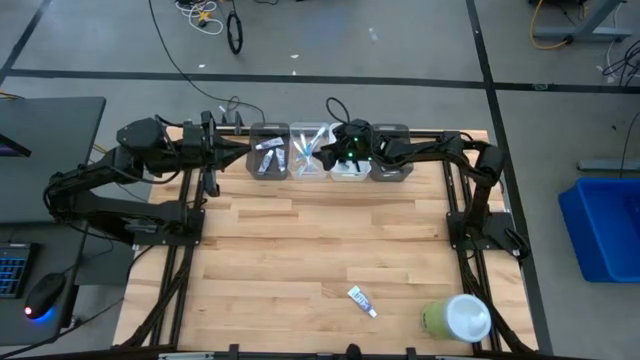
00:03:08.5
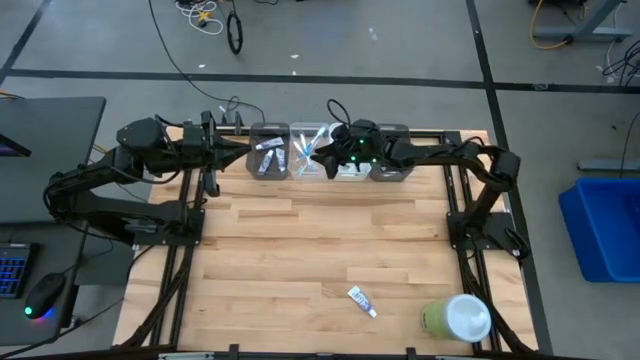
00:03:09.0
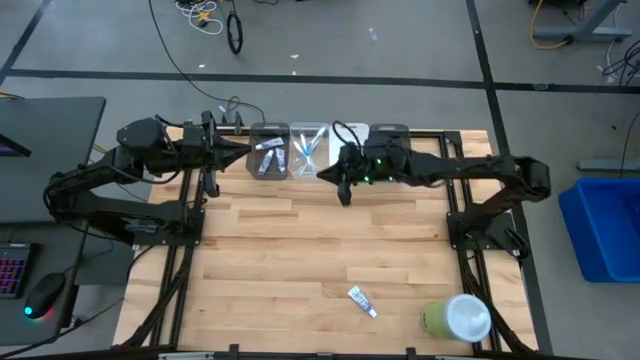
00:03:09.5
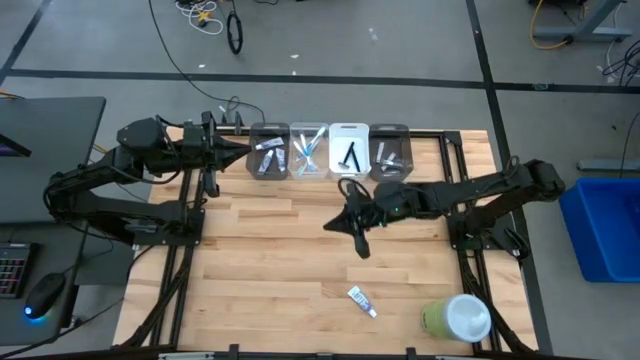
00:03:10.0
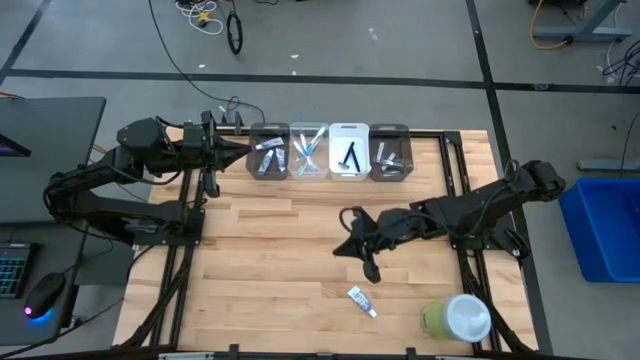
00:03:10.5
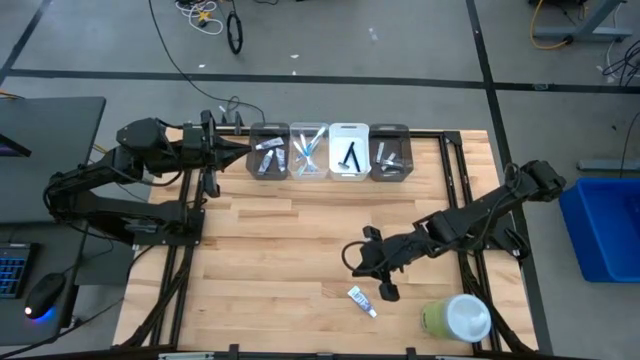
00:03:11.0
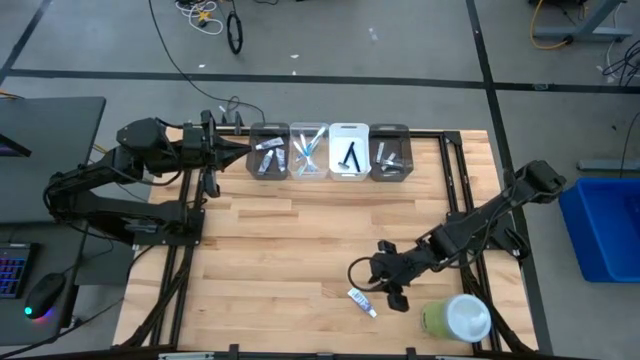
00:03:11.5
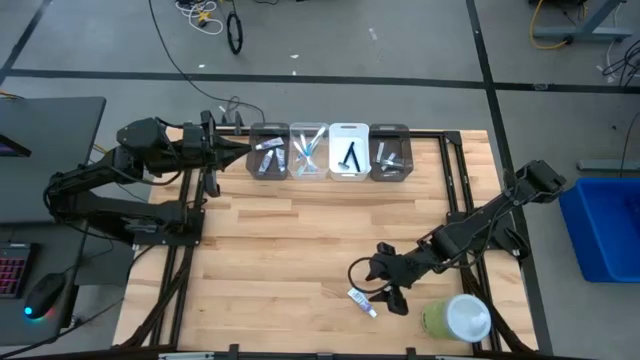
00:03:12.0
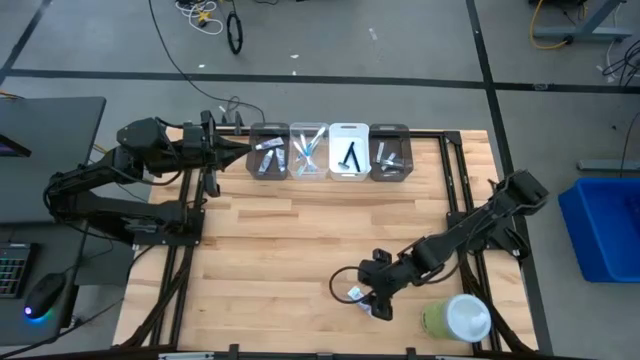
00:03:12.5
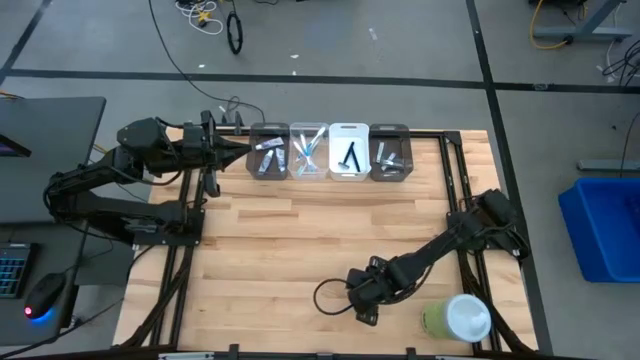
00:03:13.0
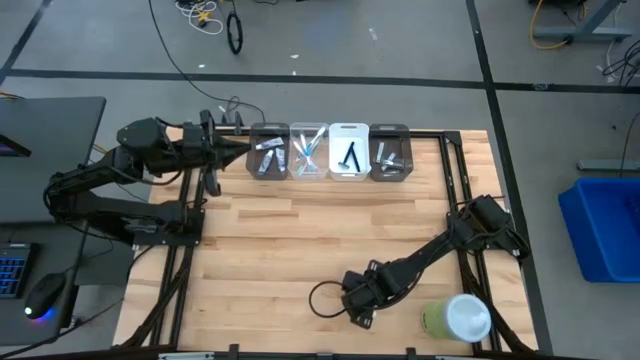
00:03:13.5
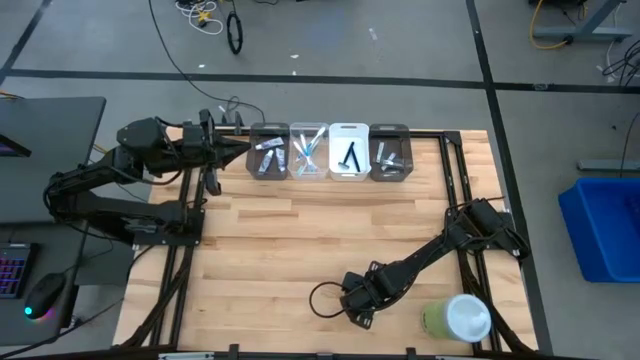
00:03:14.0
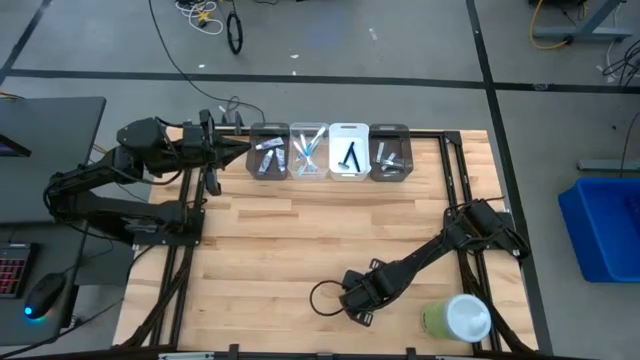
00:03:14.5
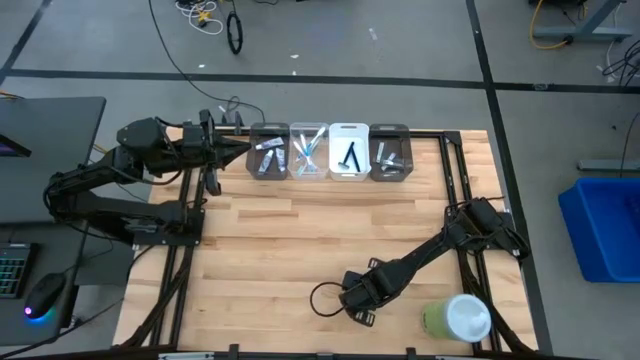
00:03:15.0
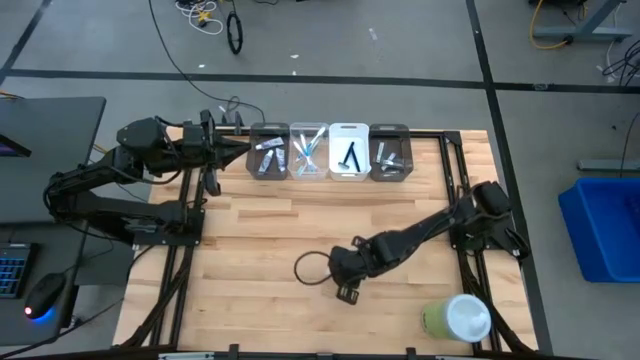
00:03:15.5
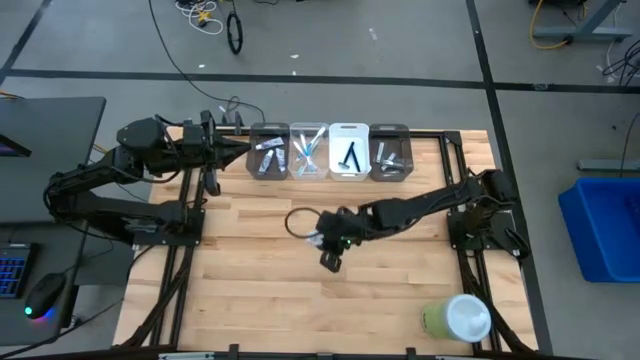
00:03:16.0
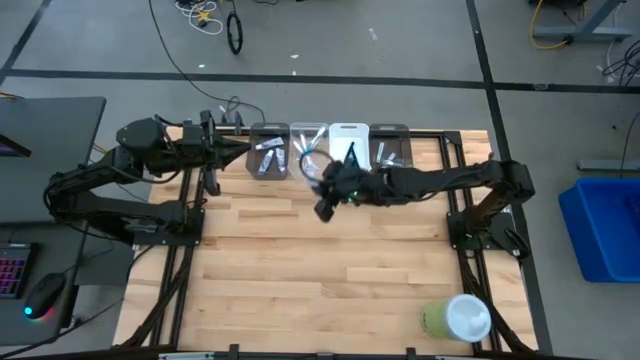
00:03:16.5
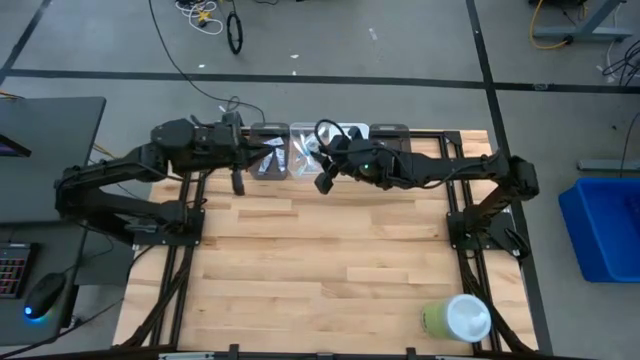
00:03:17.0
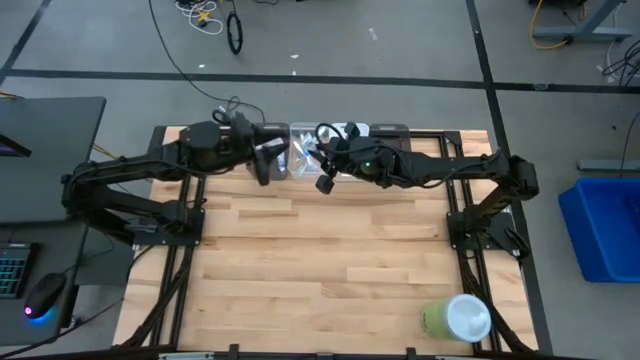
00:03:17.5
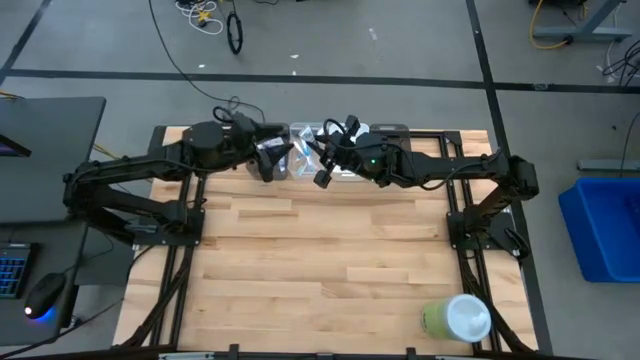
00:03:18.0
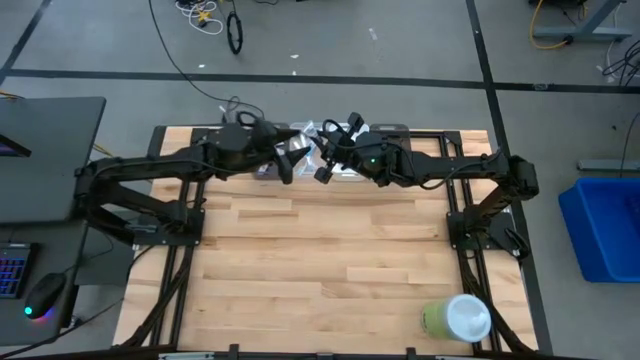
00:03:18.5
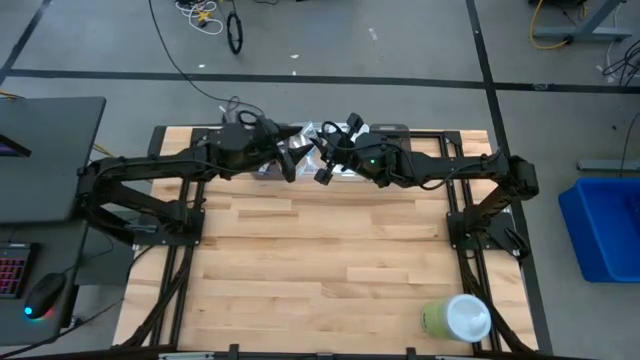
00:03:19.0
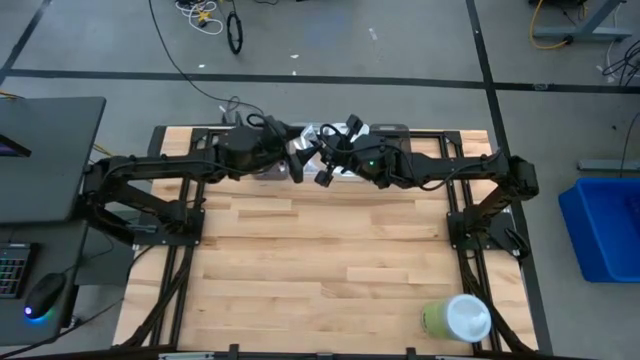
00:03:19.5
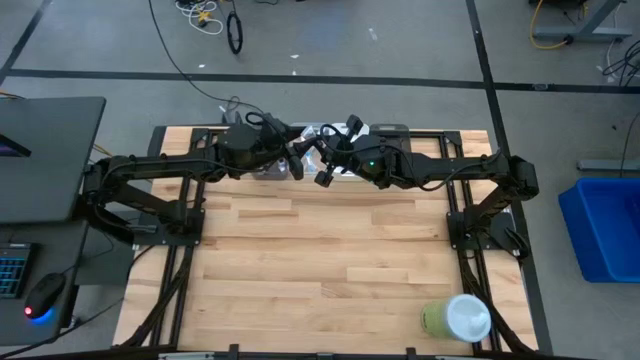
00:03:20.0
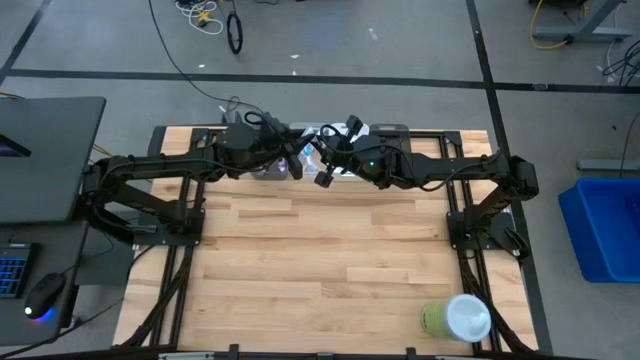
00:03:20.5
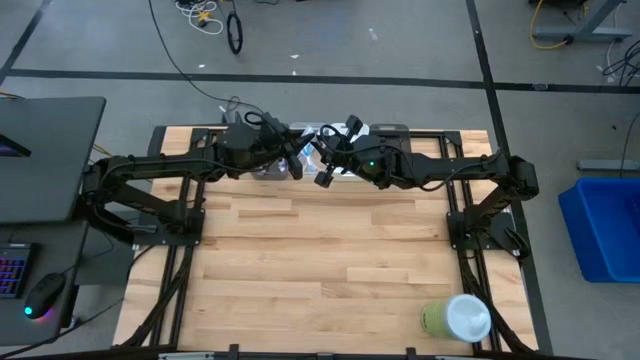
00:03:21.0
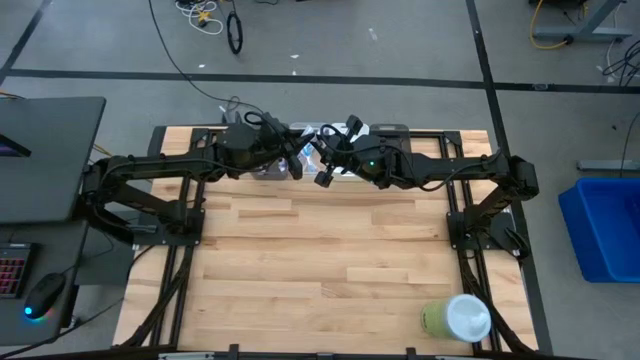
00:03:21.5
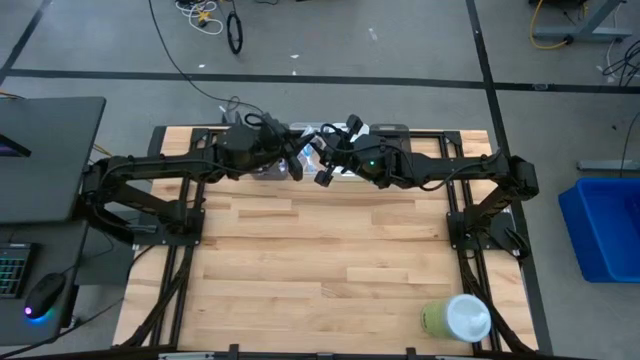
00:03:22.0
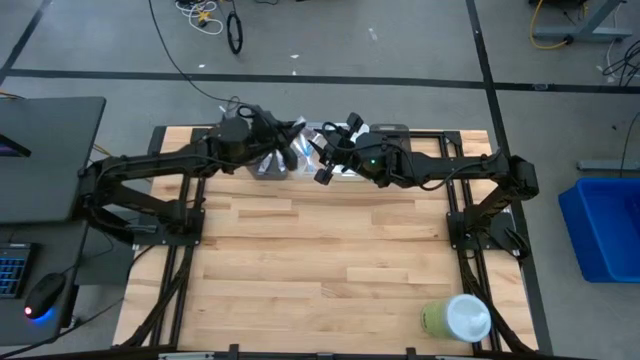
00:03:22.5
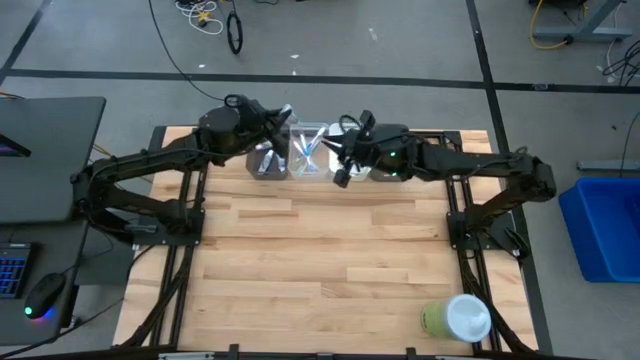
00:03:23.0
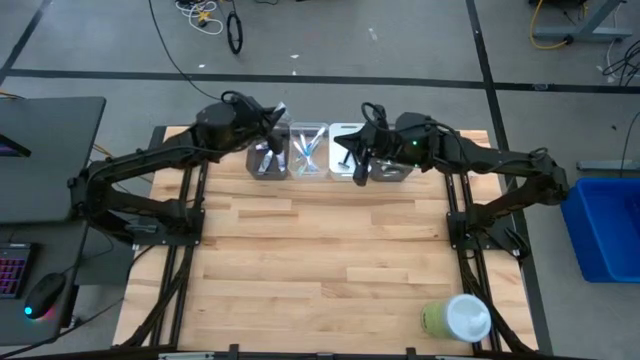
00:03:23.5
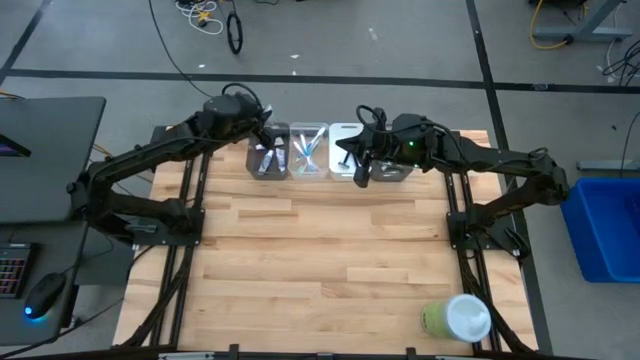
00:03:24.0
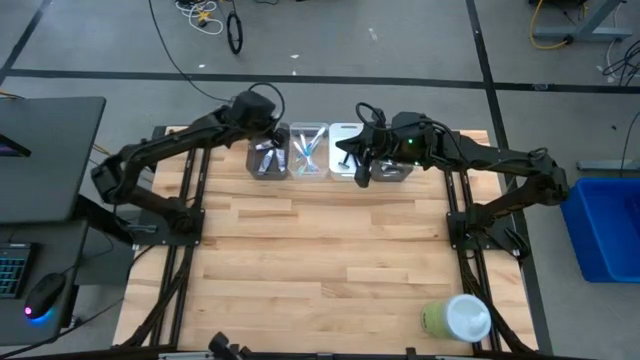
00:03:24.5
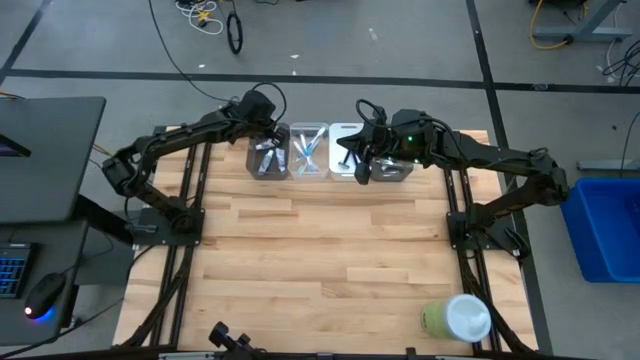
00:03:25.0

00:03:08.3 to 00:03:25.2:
Task: Pick & Place Travel size toiletries
Put the white toothpaste into the left black bin

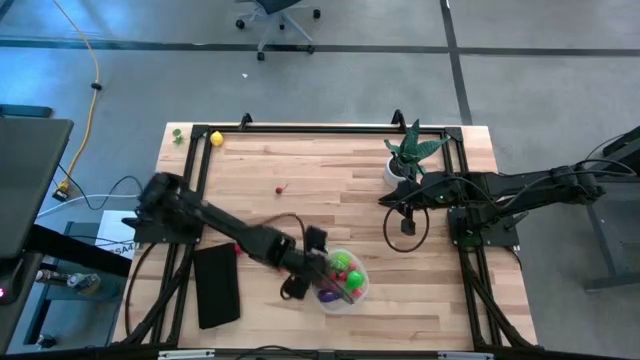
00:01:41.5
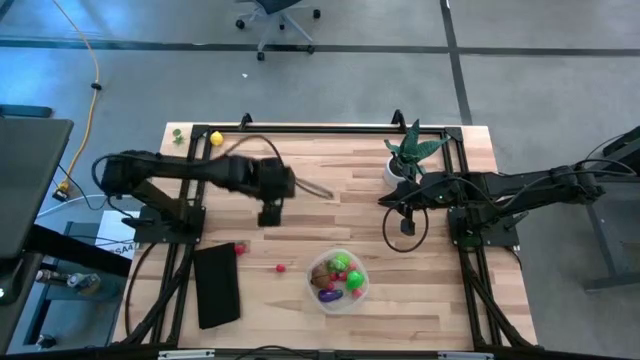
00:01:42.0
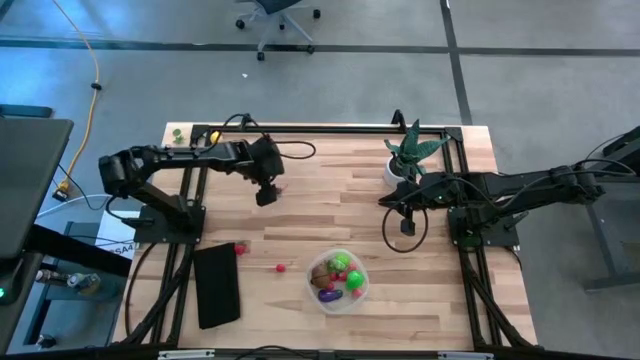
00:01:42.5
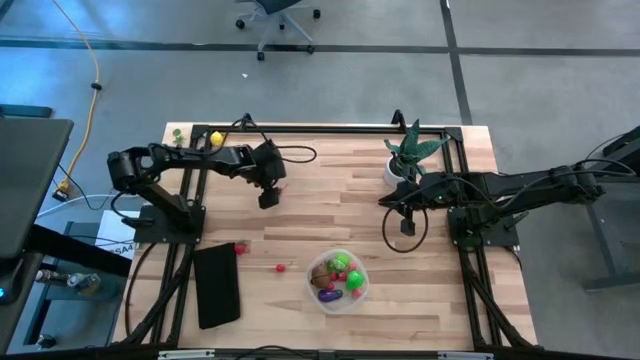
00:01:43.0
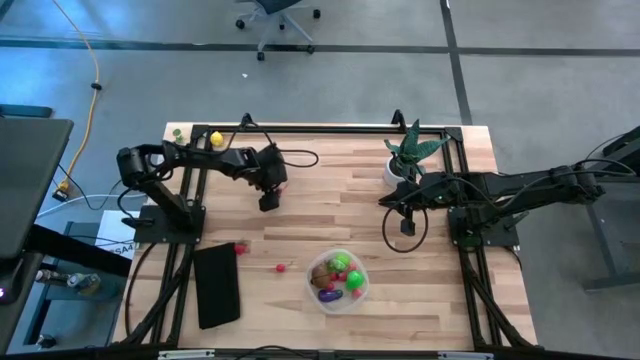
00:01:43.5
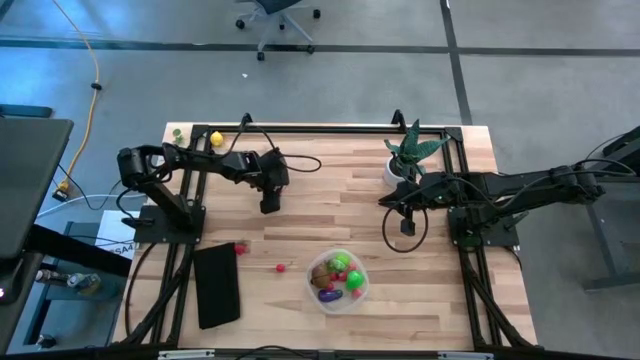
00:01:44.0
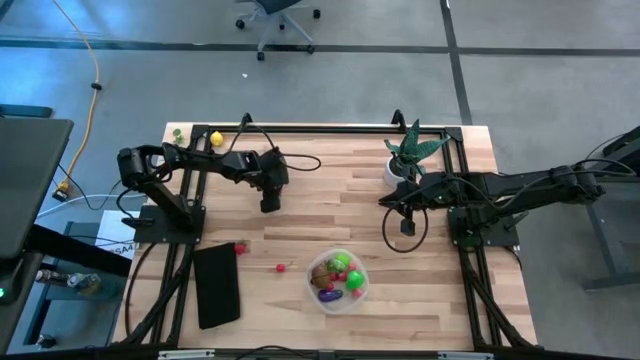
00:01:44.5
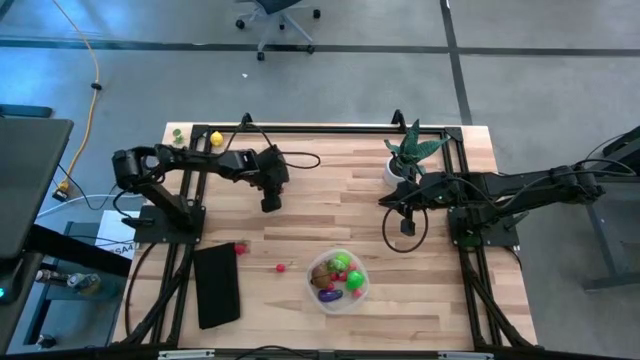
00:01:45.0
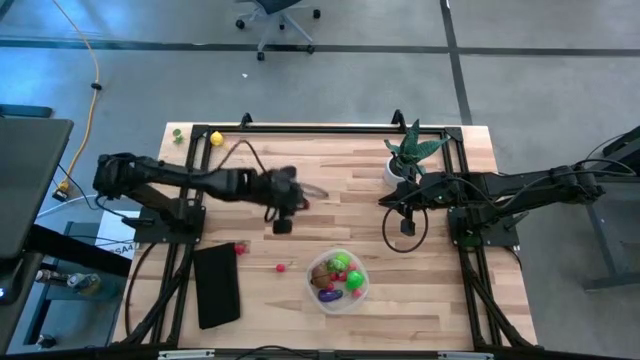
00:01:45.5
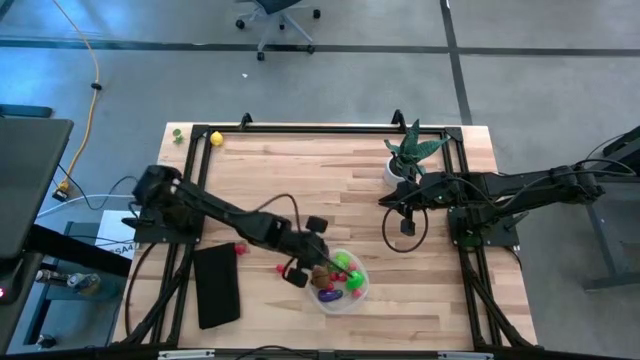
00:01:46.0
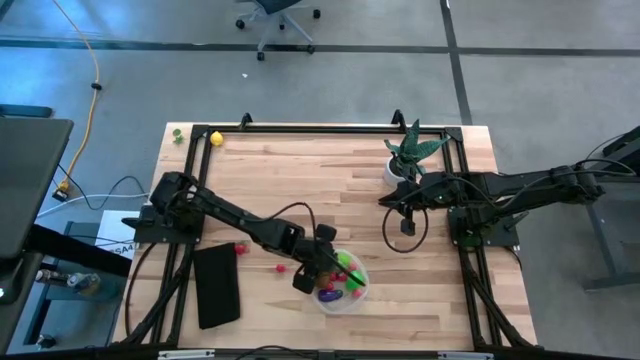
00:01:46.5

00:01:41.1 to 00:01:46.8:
Task: Pick and placing Produce into tupperware
Put the red cherry into the transparent container
